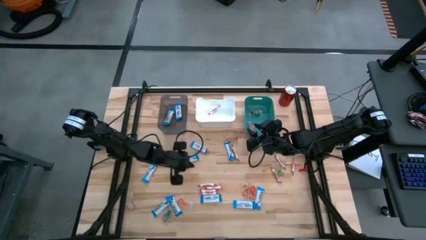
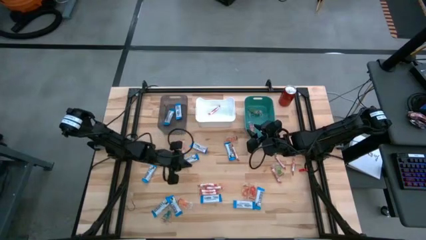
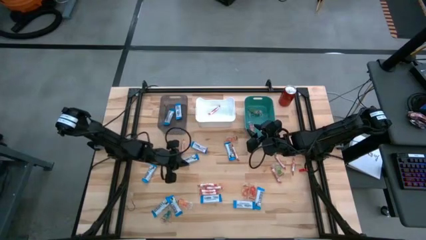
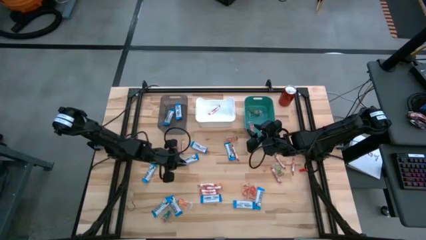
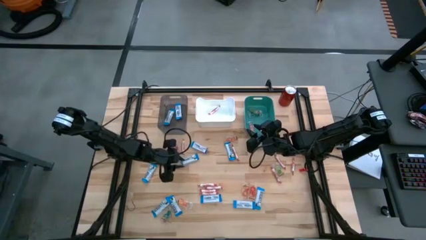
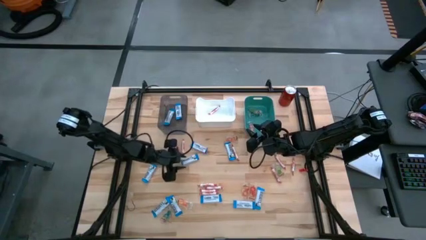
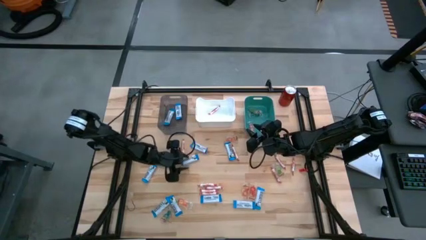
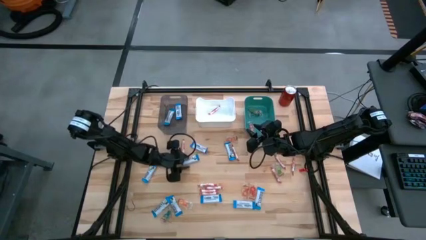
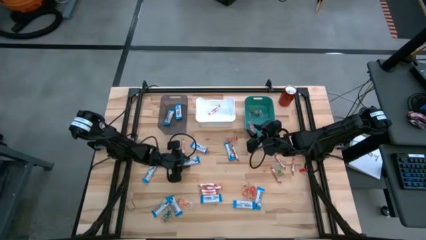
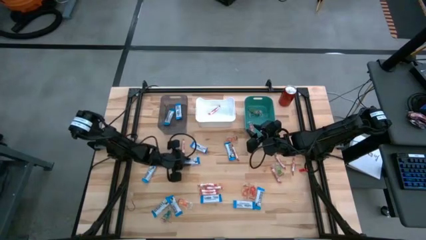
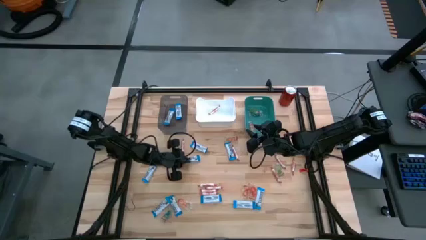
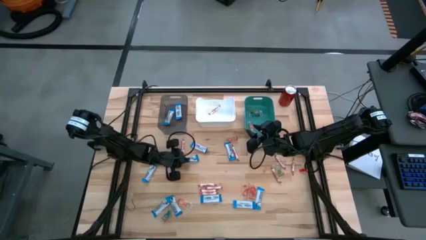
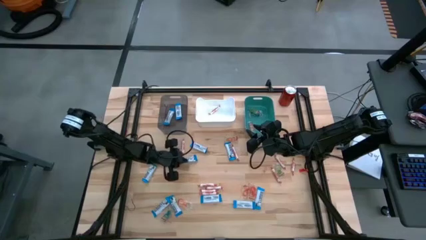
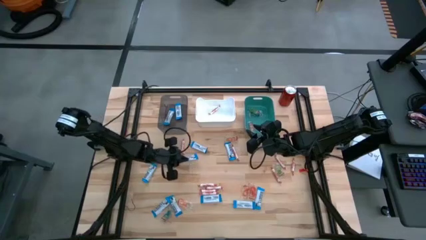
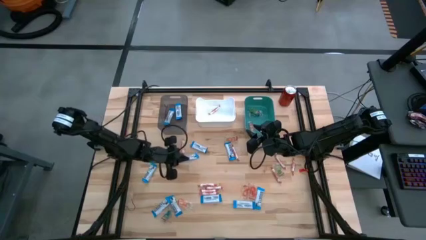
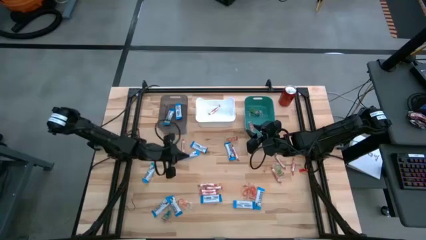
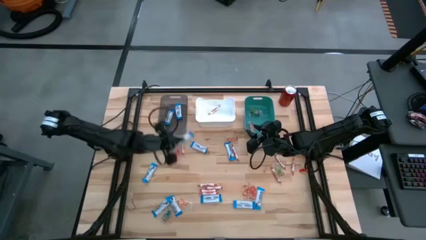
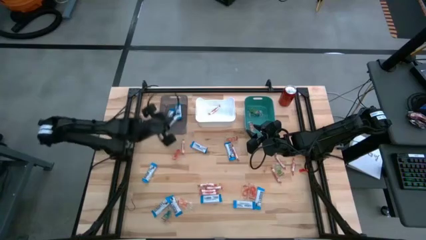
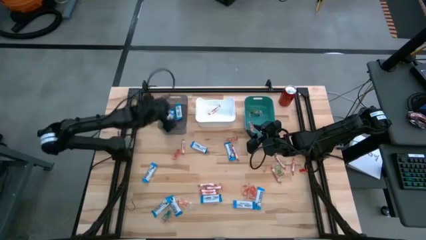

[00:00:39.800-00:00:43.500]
Task: Sort candy
Put the white chocolate into the gray bin

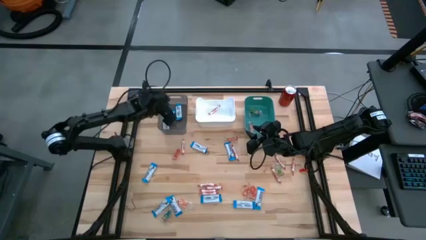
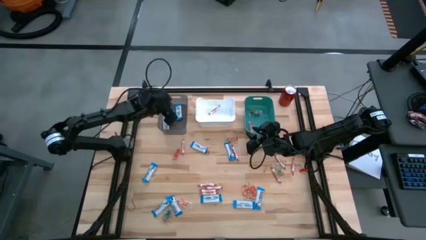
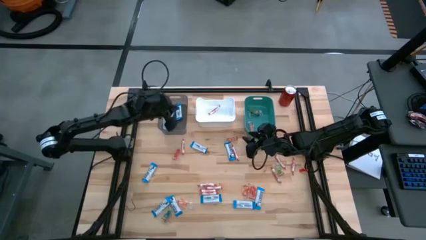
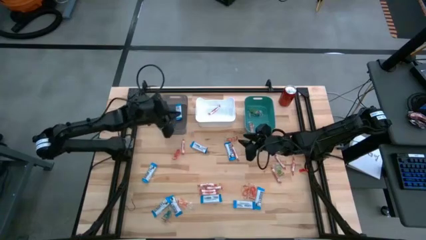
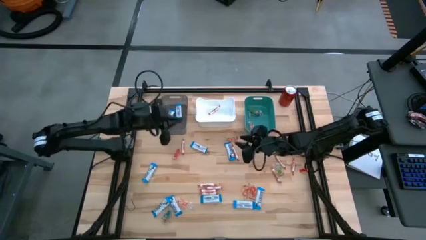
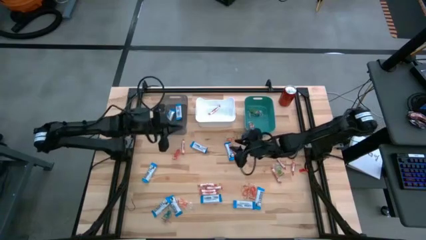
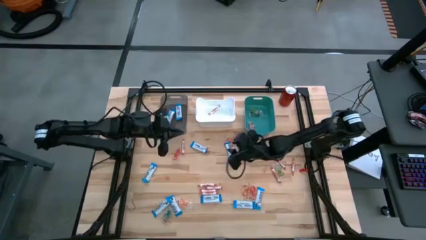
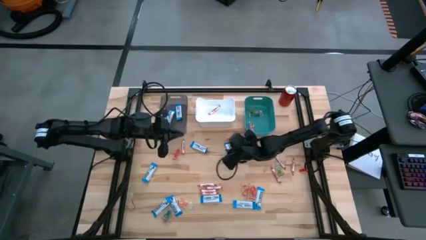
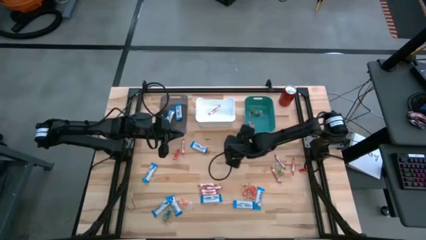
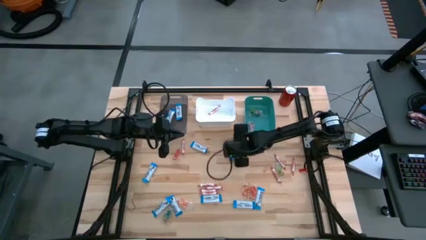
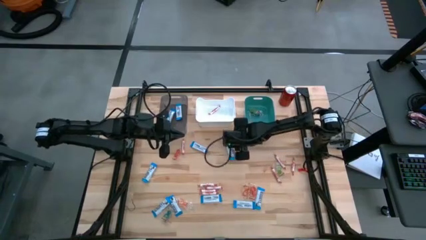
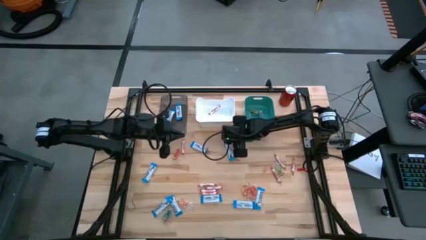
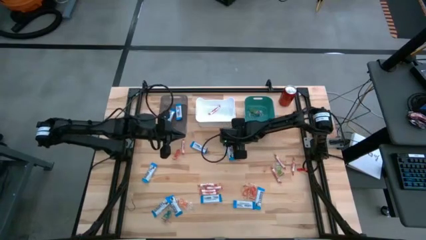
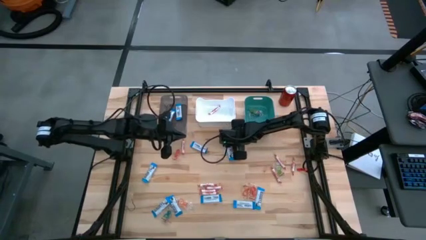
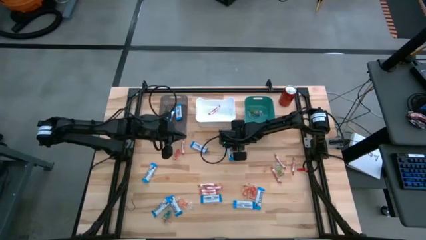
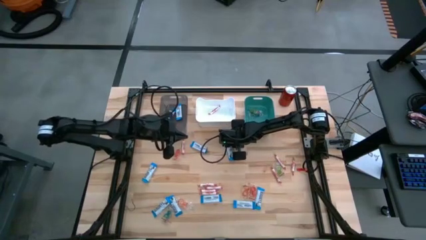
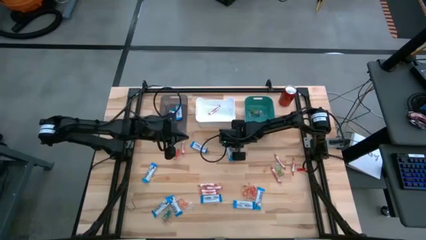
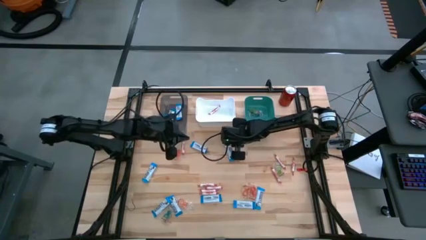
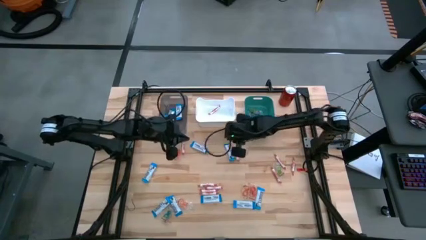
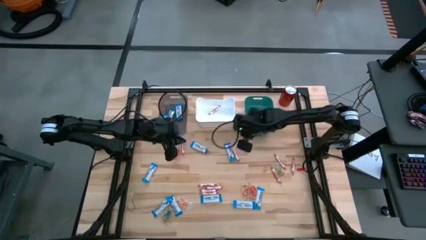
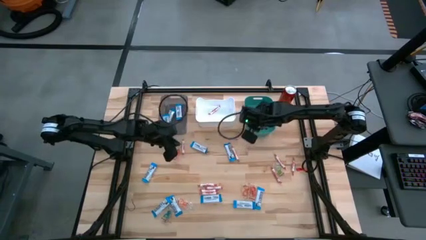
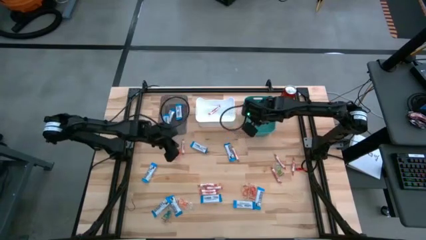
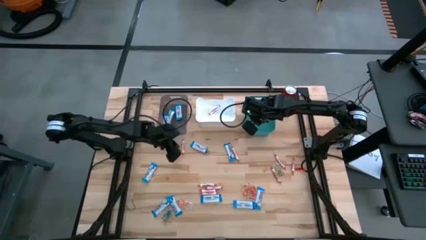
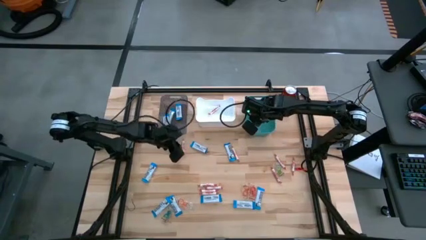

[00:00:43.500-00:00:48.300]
Put the transparent candy into the green bin

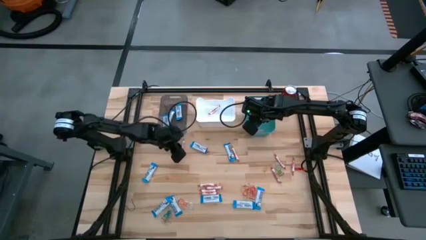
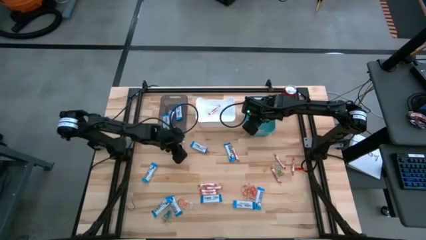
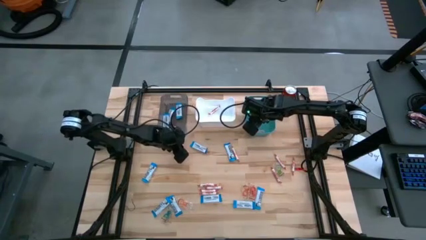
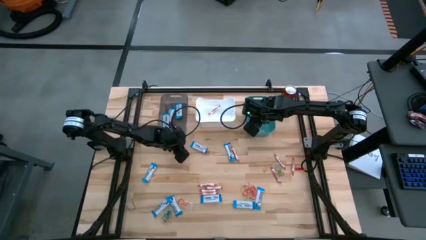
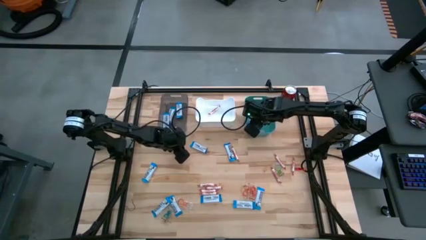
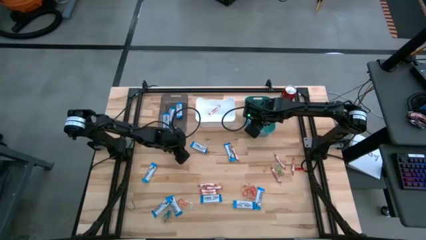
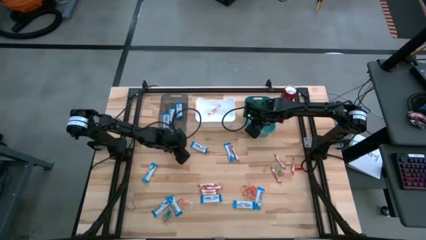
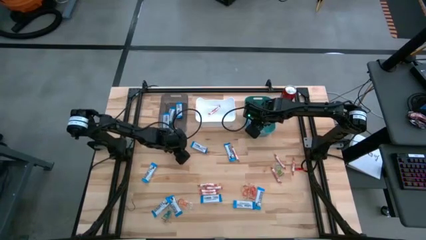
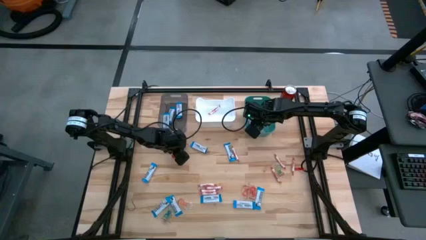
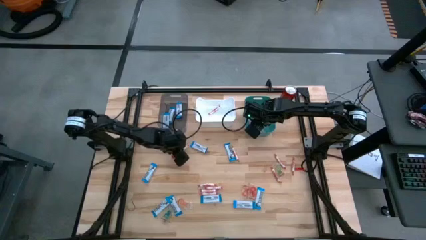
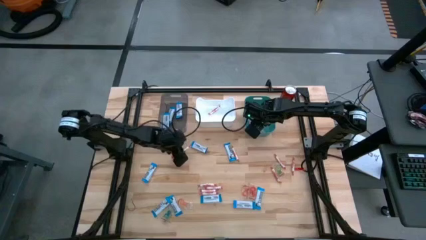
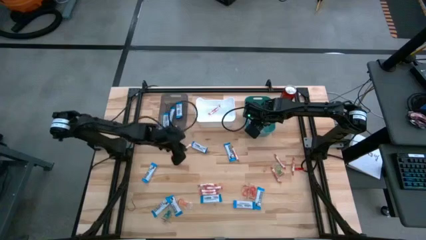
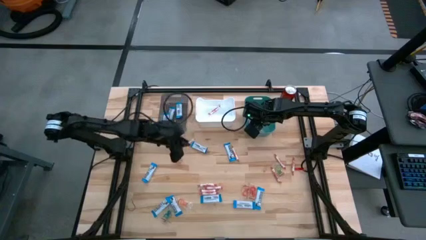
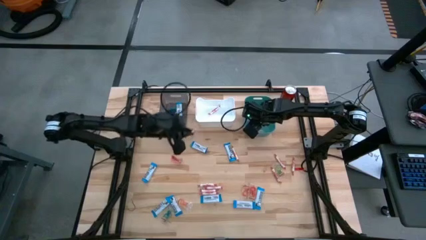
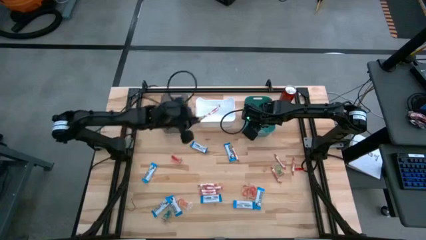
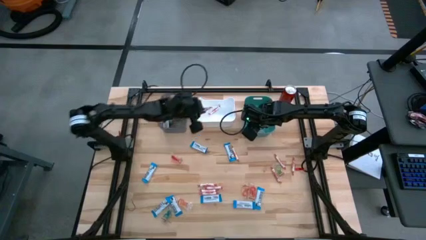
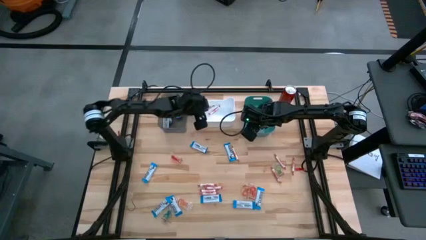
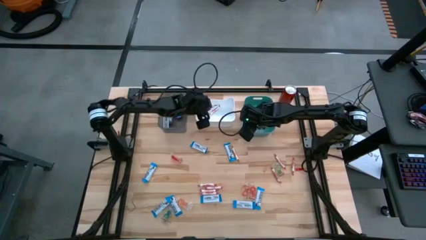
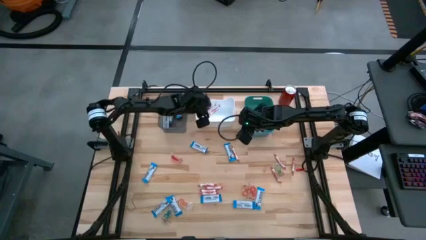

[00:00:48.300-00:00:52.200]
Put the orange candy into the white bin

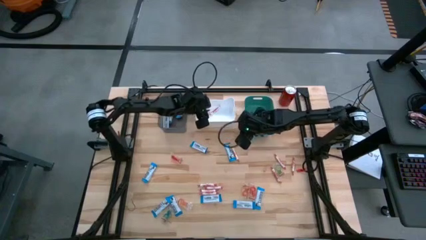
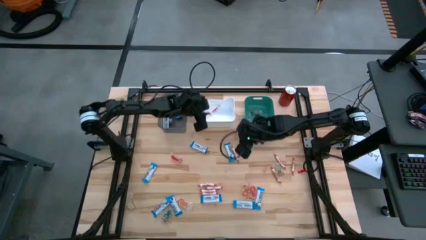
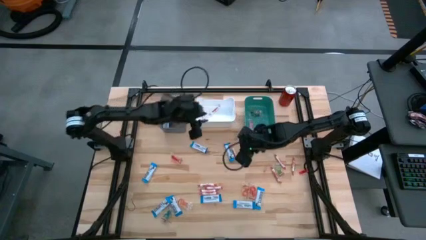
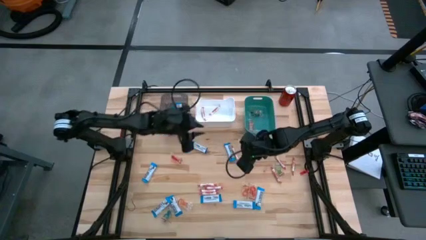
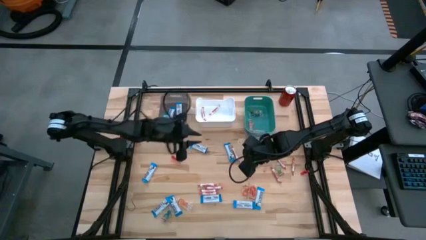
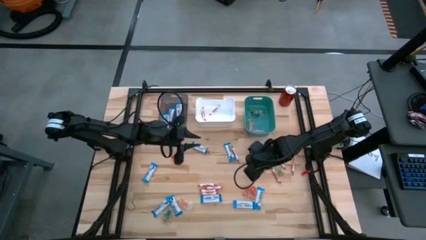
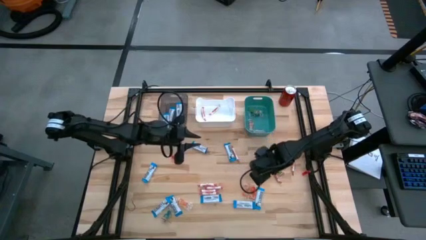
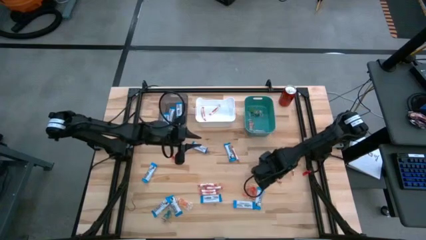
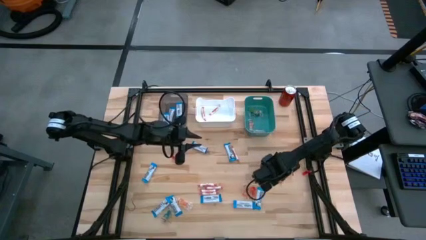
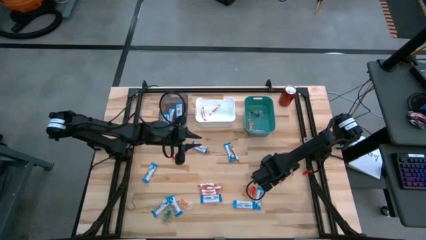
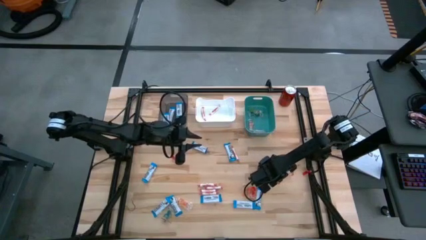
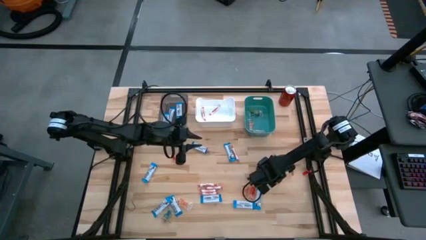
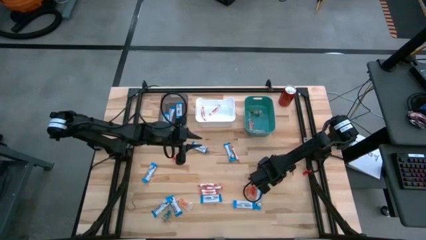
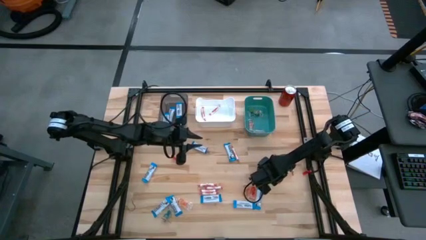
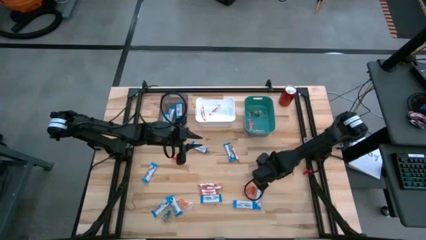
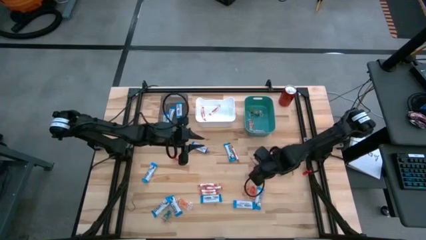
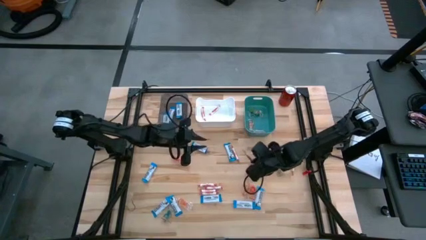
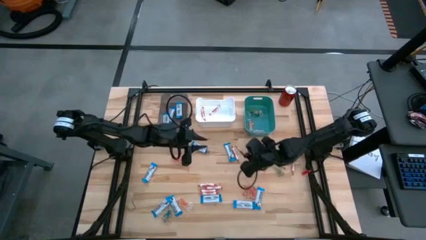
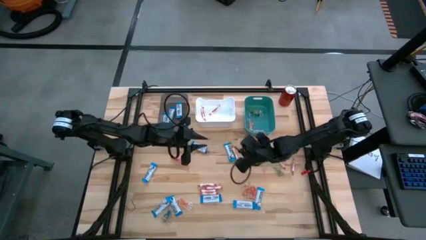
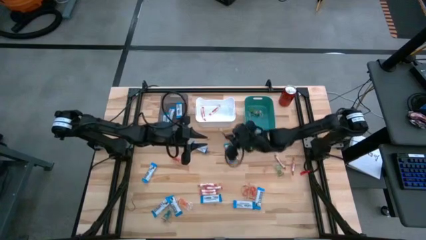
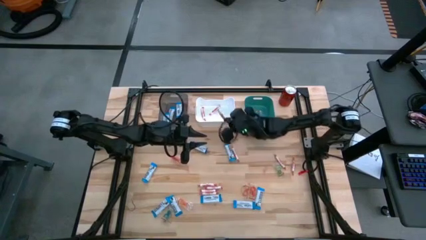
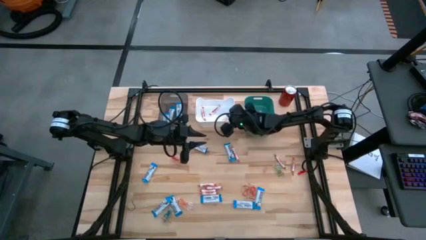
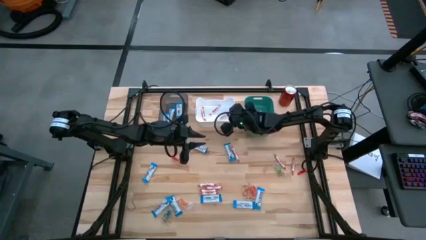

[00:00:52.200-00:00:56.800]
Put the orange candy into the white bin
